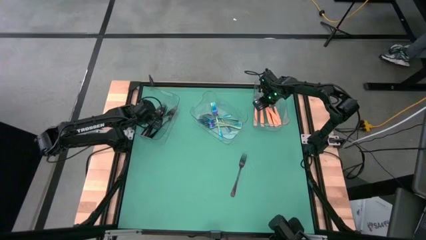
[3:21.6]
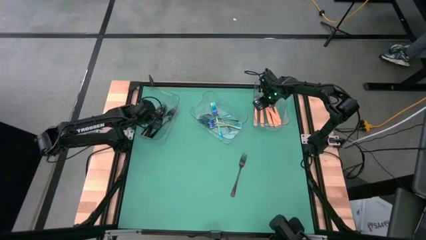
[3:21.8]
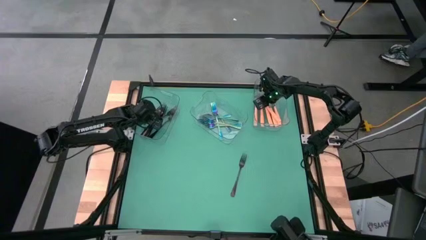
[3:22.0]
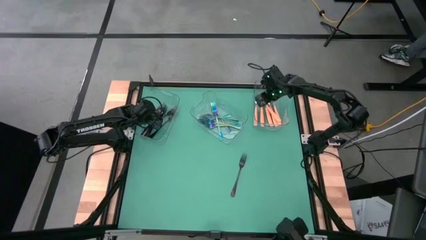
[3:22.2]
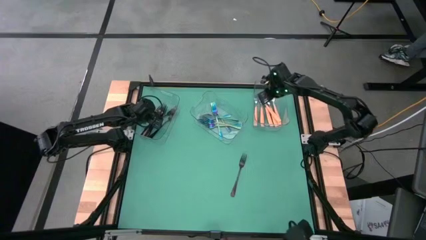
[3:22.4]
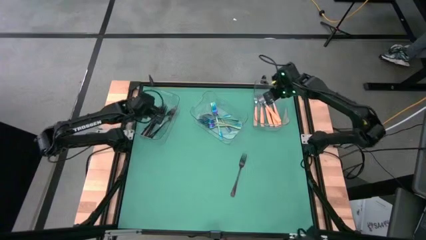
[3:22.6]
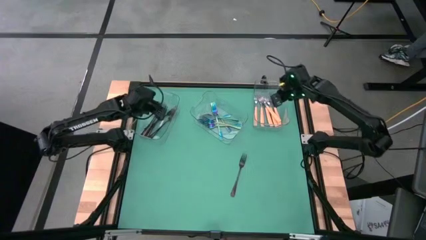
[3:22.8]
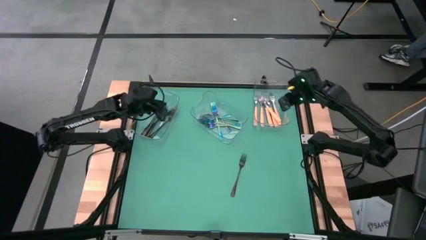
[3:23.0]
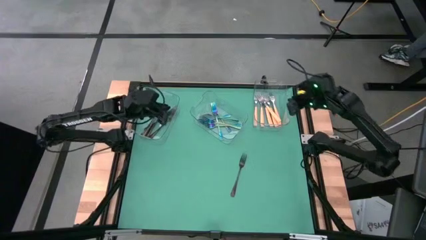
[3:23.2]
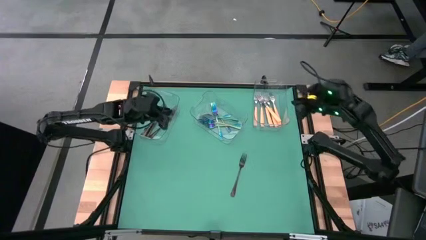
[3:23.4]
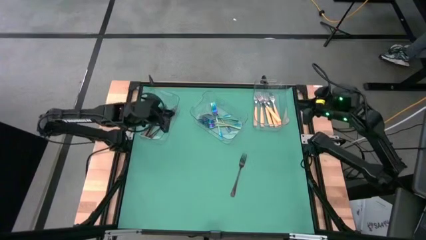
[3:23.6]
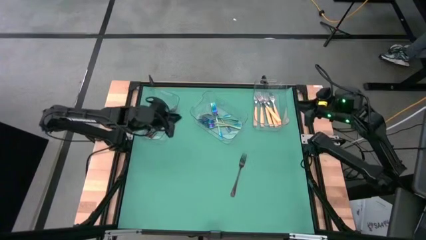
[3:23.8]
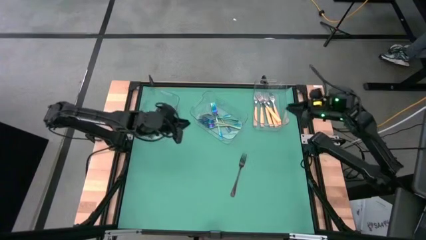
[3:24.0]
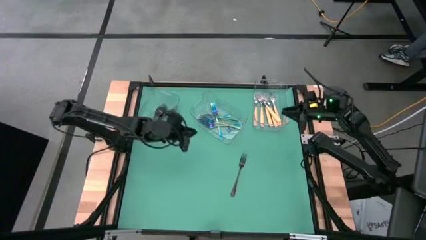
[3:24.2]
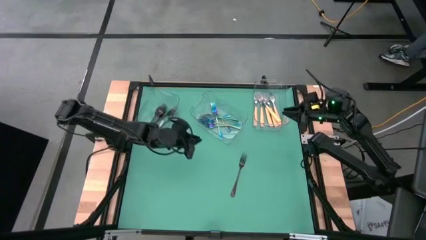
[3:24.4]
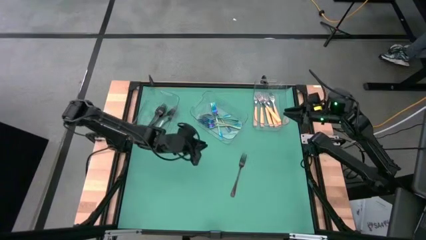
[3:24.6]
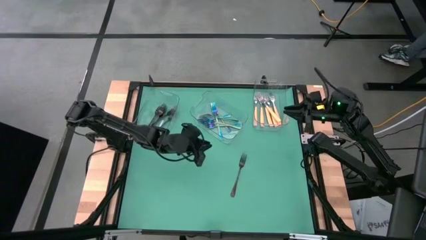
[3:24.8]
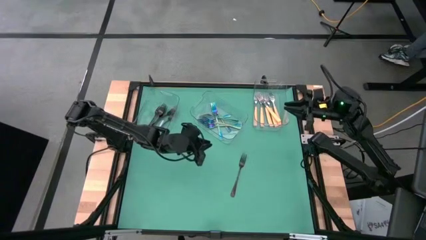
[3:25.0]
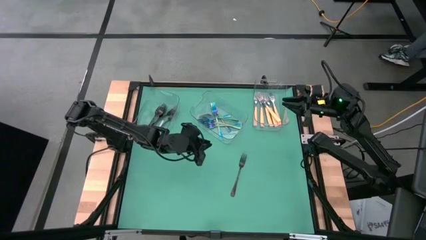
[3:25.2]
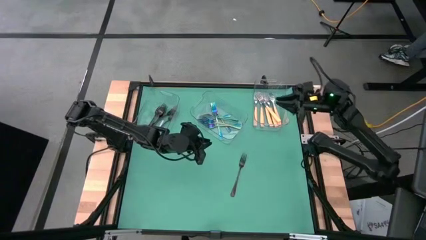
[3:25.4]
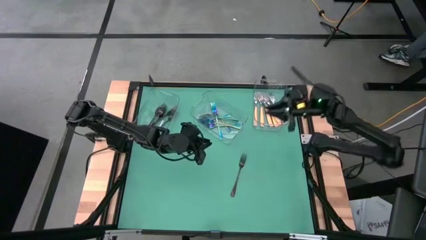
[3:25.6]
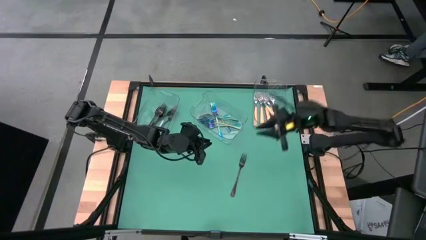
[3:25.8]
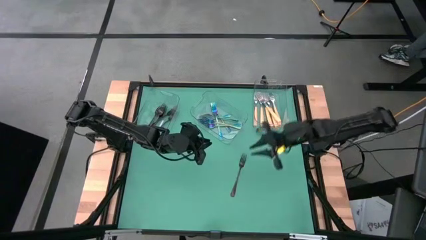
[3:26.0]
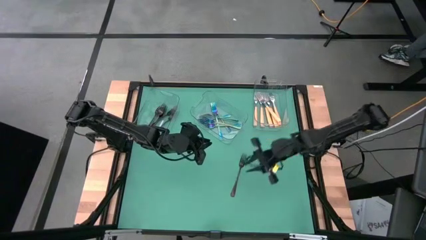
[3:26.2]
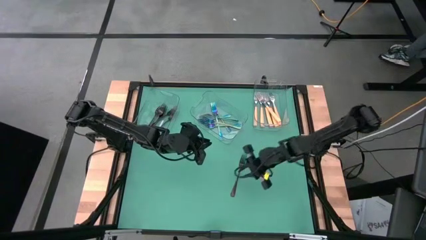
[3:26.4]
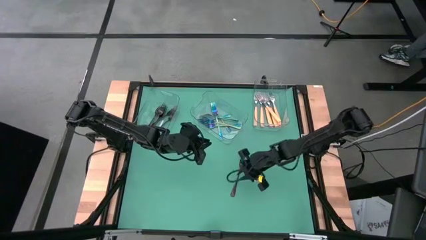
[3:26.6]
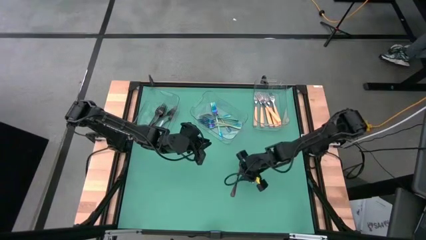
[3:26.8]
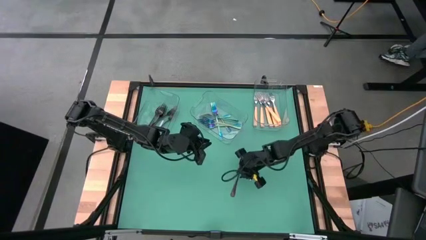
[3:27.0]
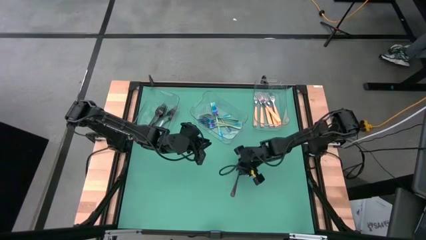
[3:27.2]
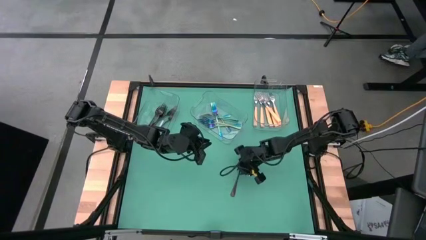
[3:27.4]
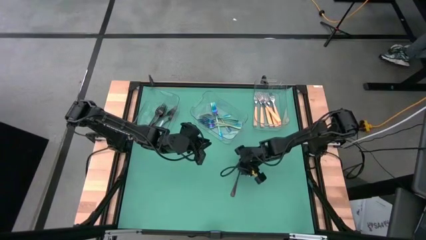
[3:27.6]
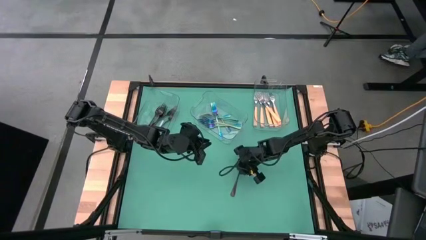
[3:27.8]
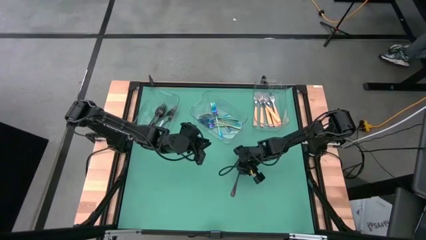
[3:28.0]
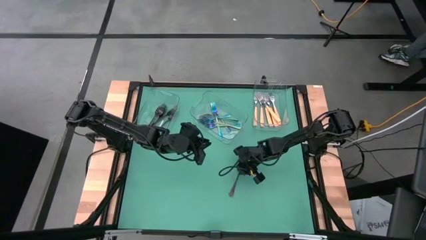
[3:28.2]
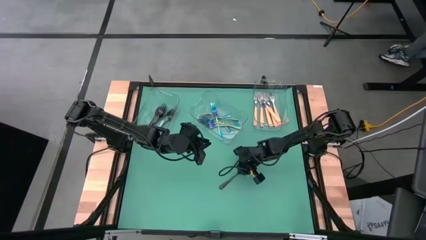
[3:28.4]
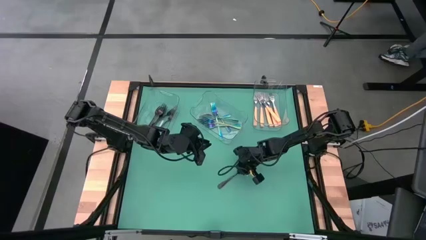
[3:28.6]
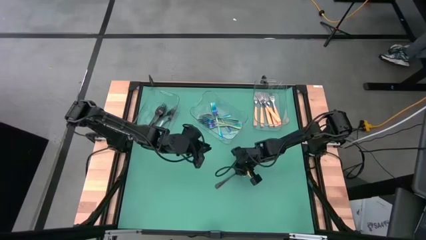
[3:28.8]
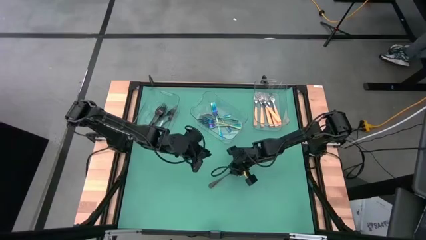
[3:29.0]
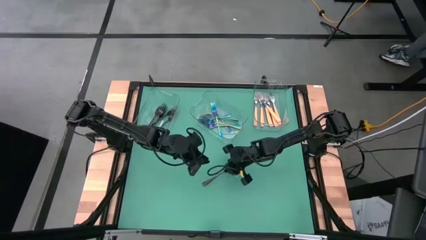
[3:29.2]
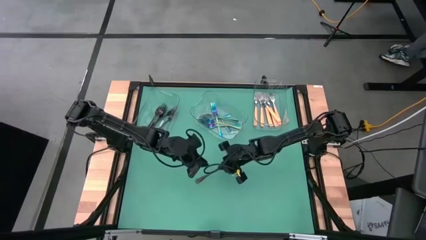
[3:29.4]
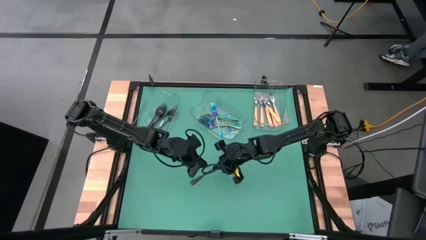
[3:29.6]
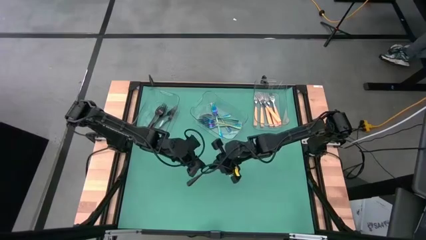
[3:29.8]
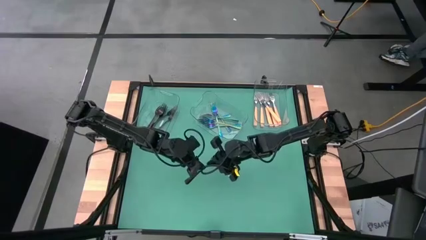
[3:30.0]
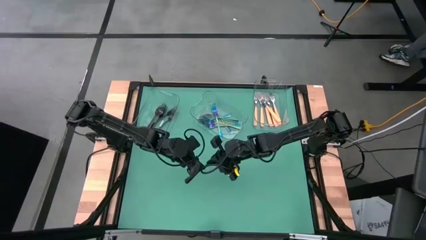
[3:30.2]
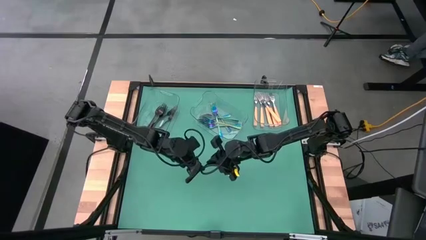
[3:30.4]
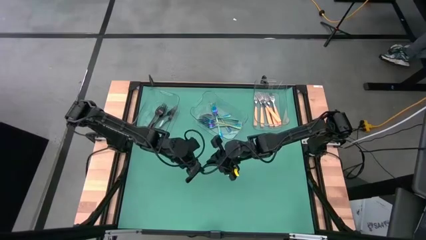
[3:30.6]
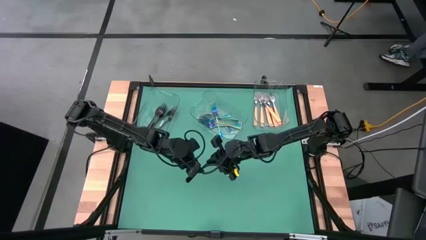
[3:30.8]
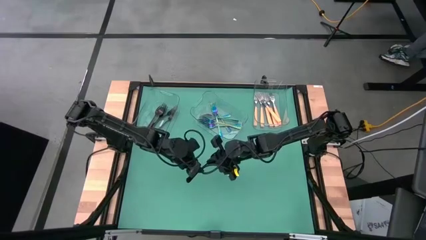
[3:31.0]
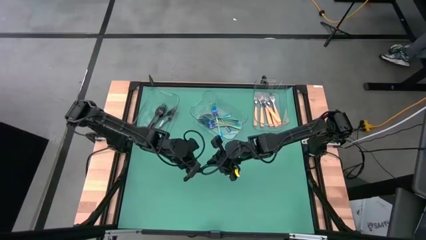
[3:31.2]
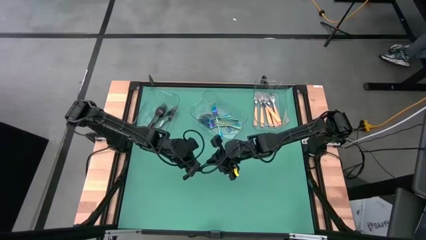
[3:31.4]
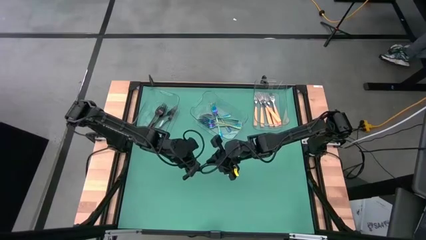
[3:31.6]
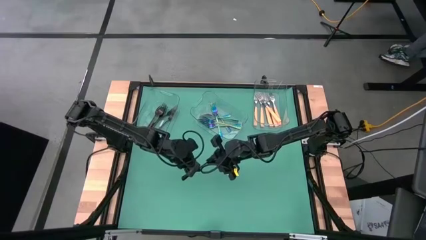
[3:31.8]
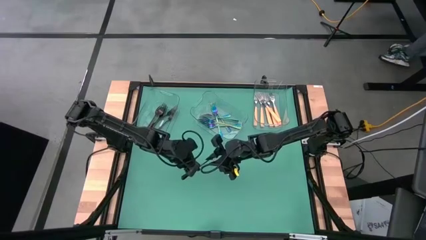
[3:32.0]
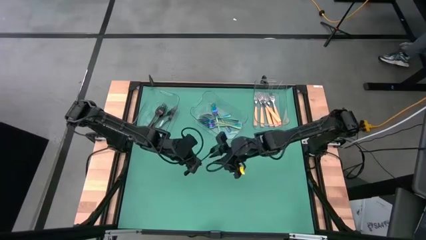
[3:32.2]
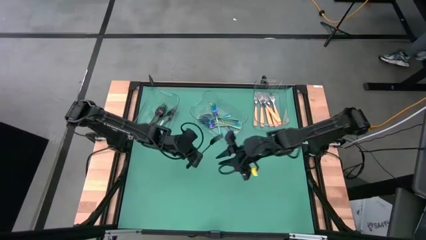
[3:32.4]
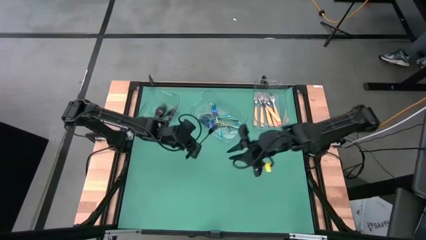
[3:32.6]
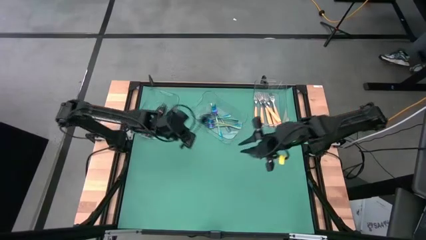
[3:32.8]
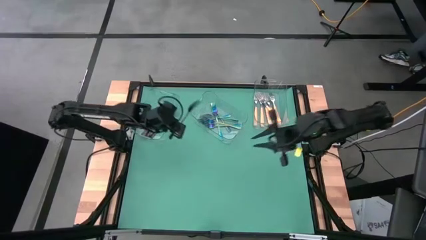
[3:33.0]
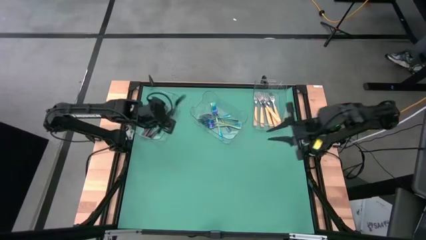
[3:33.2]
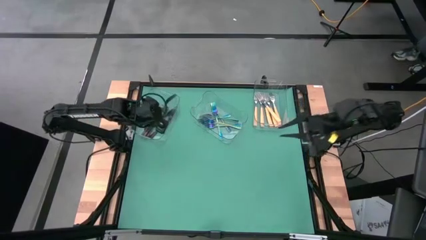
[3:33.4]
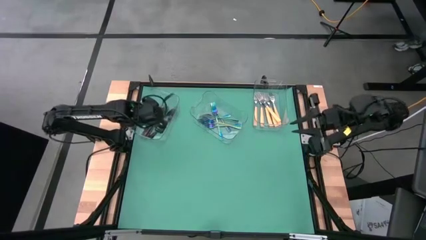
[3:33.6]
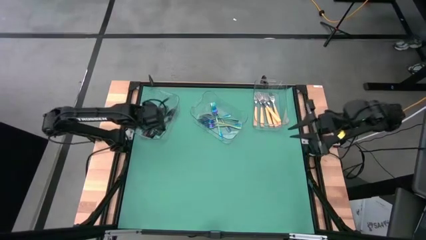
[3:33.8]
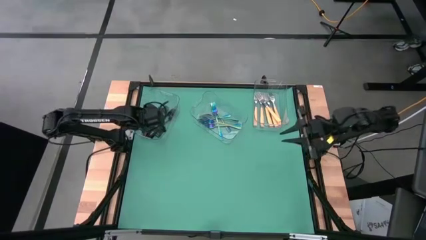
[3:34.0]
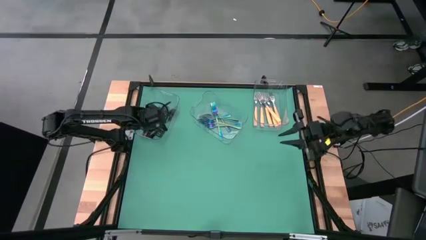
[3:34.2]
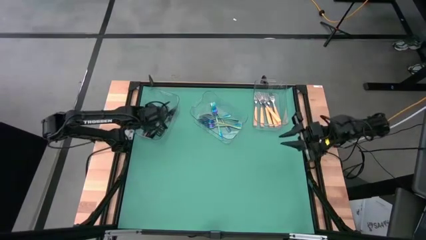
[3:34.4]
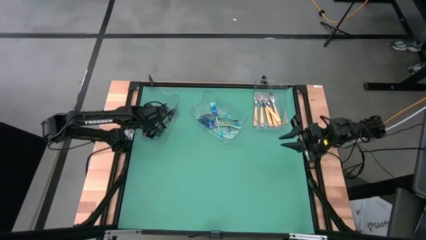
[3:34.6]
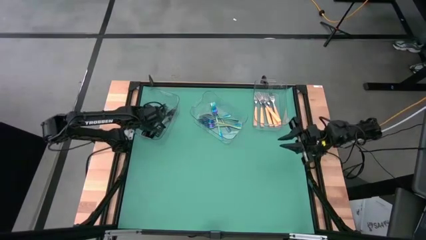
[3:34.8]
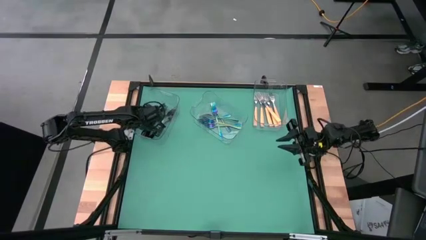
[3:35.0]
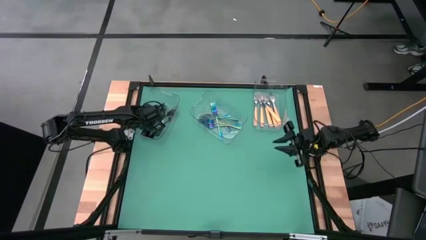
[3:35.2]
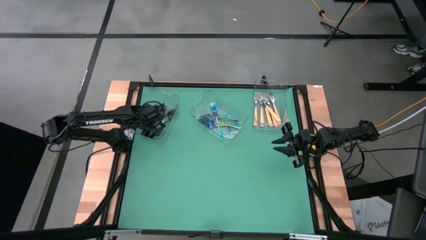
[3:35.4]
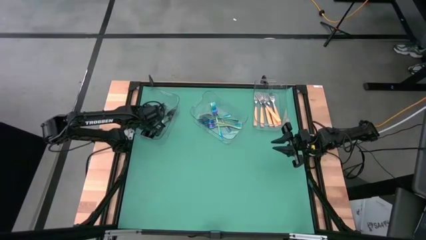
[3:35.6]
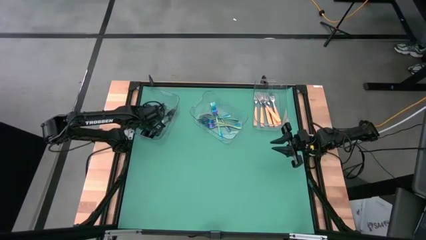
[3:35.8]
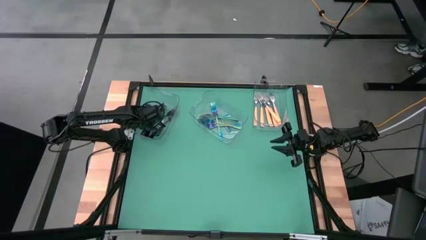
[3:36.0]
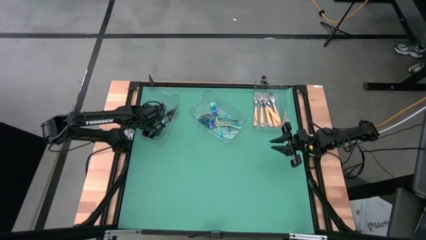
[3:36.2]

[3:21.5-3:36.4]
Task: Sort silverware by color (type)
Put the black fork into the left transparent bin

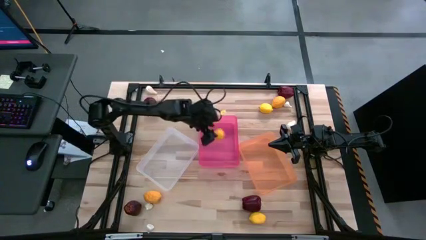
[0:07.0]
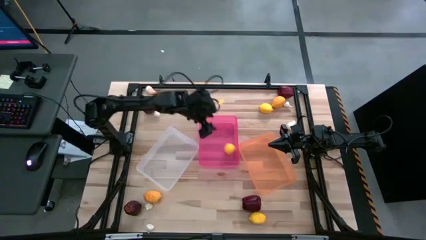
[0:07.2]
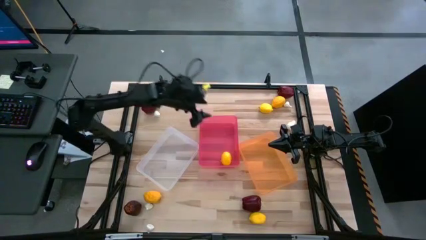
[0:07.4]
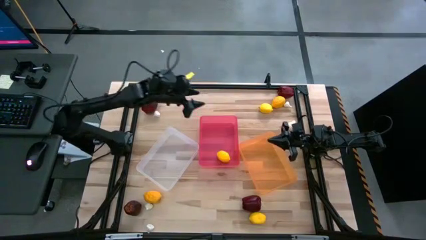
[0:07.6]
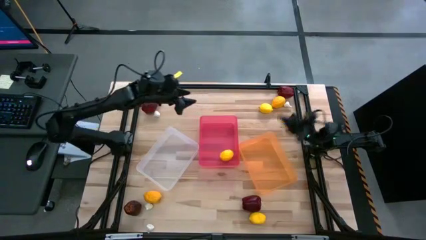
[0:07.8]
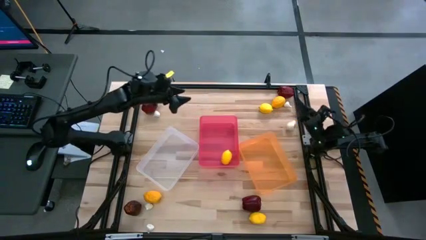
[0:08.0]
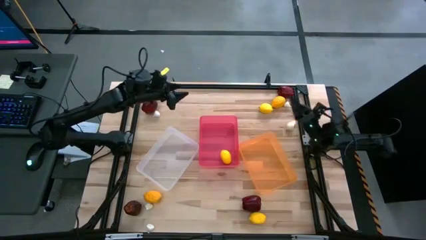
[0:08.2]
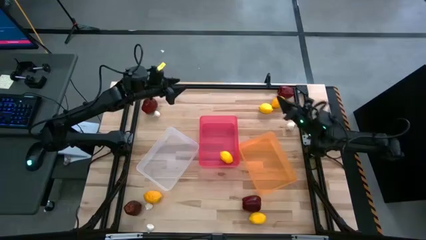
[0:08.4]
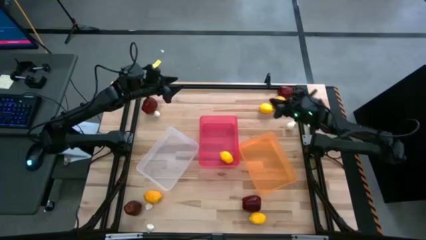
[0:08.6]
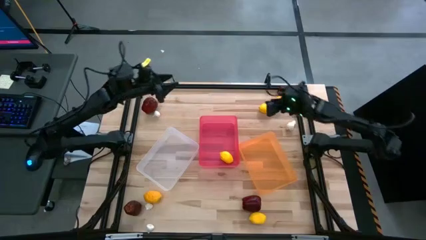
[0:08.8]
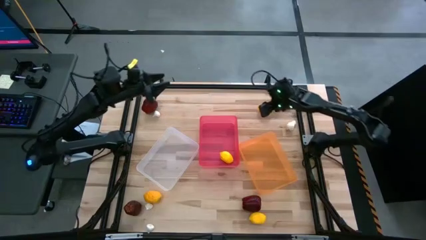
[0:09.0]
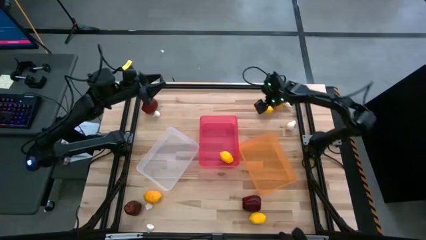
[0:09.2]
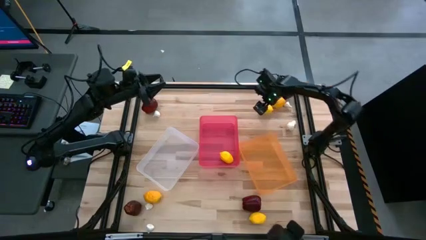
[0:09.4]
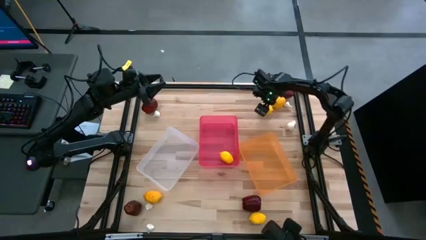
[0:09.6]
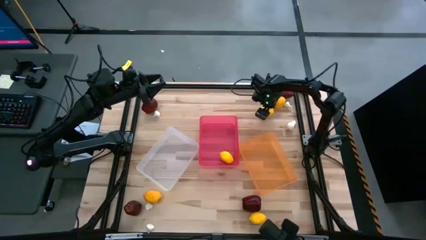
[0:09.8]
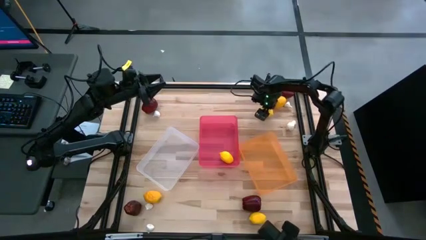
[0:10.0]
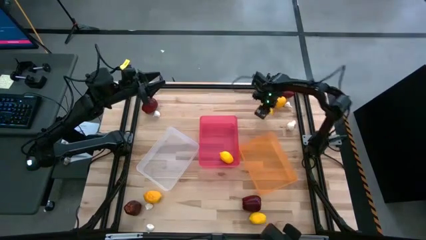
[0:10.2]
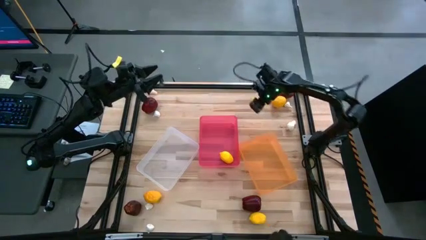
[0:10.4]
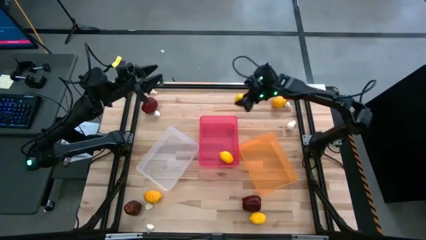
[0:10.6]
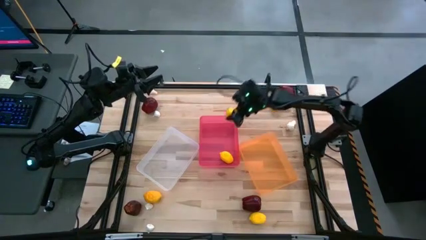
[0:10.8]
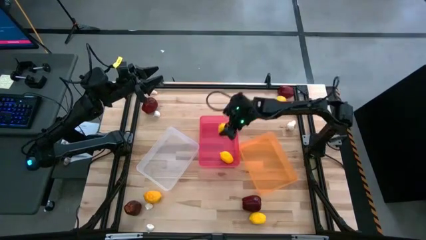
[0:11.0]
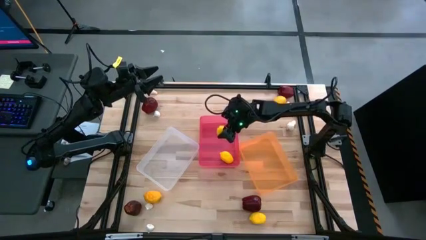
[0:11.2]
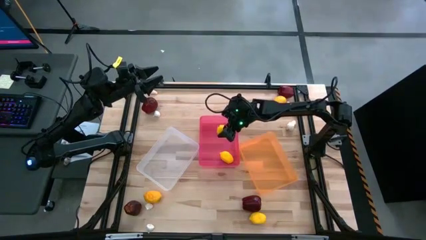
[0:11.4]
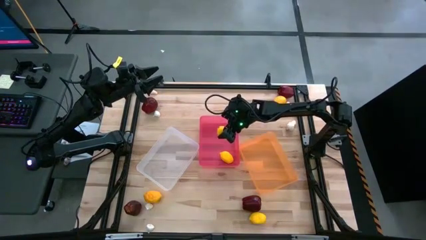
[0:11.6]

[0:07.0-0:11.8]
Task: Sort produce into baskets
Put the yellow lemon into the red bin
